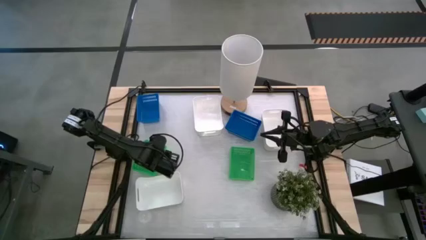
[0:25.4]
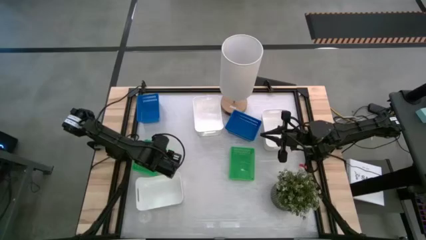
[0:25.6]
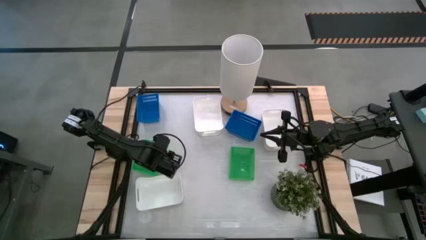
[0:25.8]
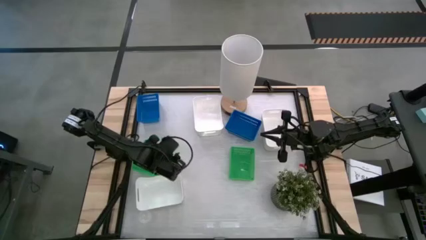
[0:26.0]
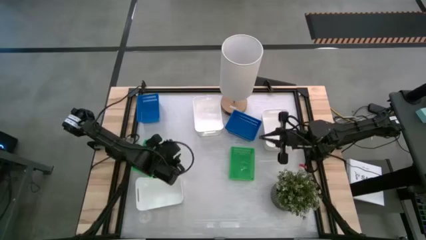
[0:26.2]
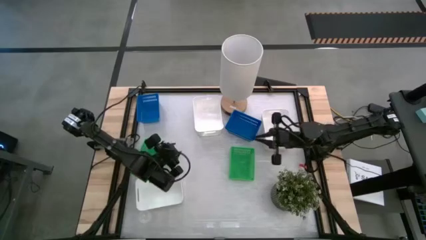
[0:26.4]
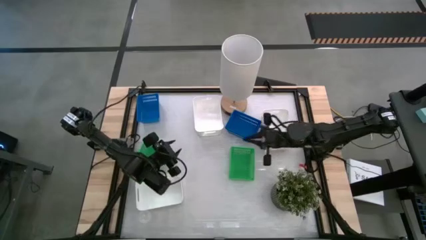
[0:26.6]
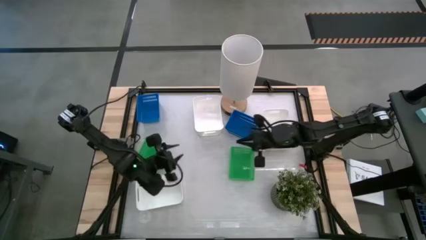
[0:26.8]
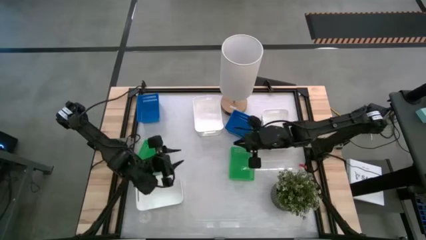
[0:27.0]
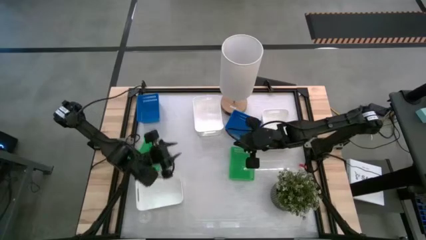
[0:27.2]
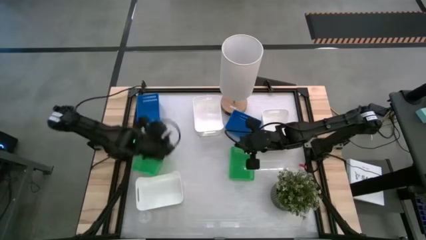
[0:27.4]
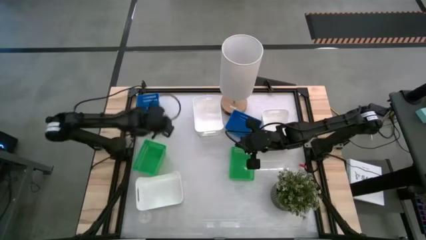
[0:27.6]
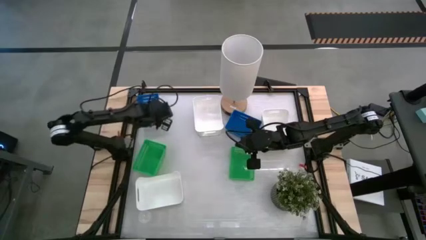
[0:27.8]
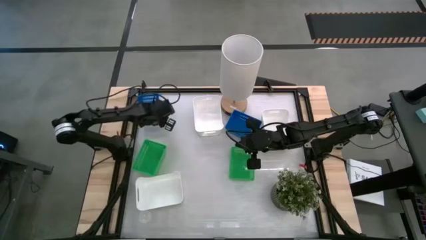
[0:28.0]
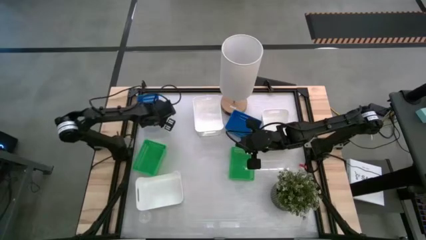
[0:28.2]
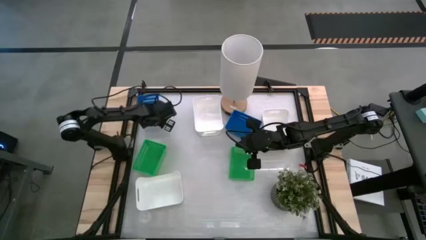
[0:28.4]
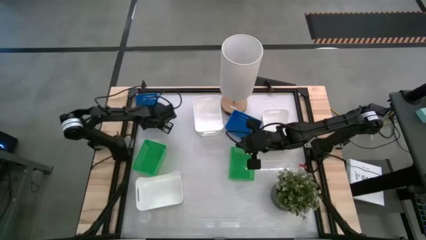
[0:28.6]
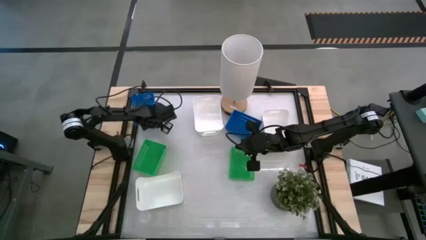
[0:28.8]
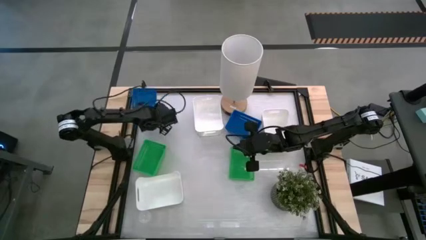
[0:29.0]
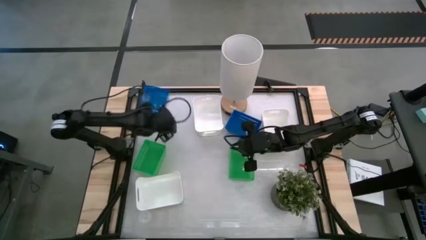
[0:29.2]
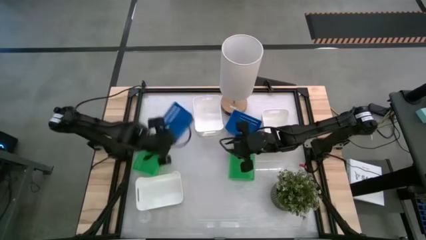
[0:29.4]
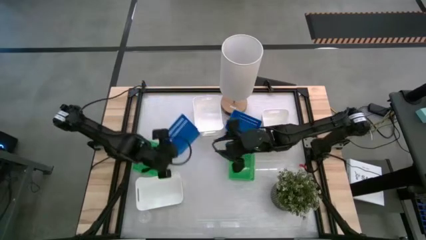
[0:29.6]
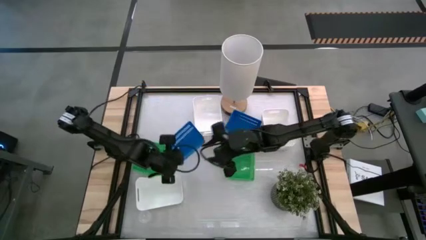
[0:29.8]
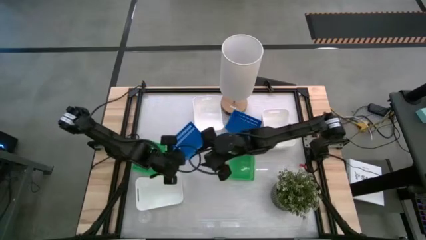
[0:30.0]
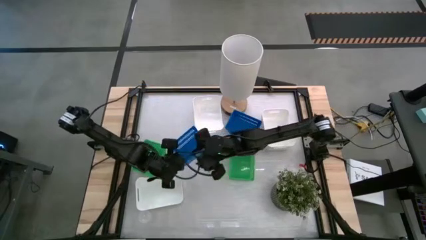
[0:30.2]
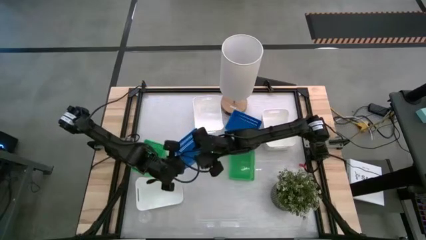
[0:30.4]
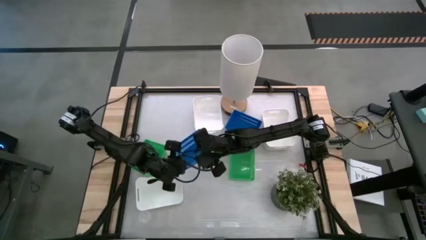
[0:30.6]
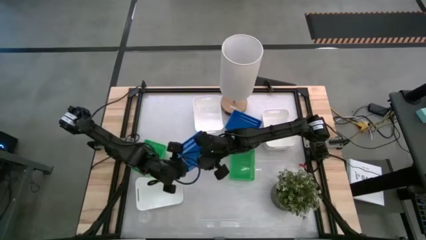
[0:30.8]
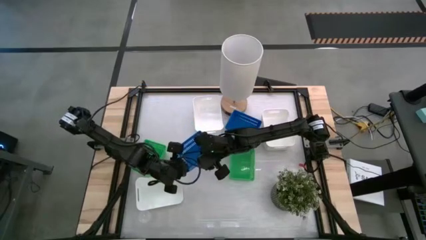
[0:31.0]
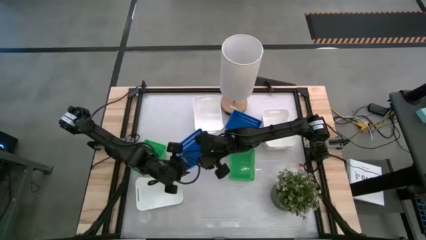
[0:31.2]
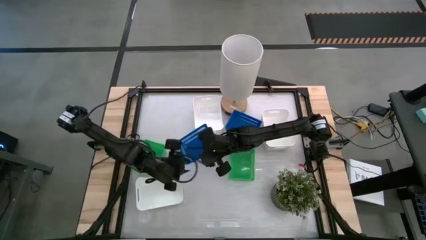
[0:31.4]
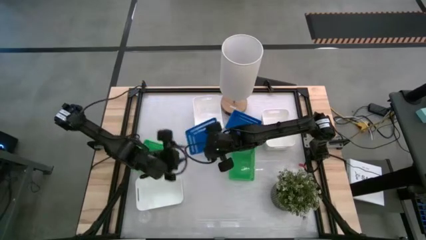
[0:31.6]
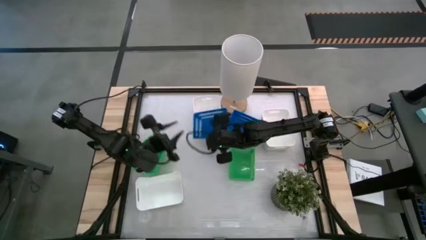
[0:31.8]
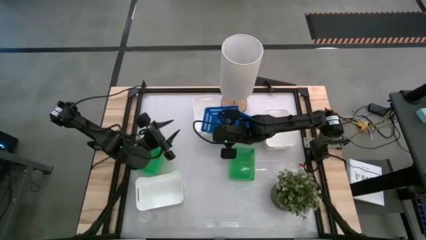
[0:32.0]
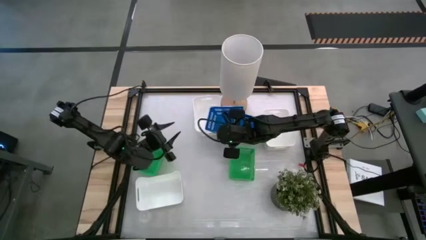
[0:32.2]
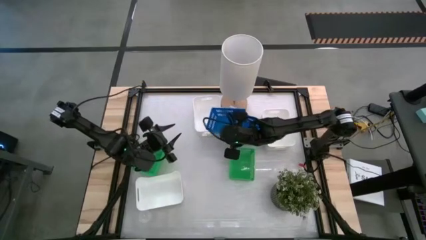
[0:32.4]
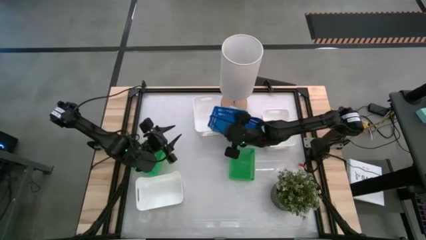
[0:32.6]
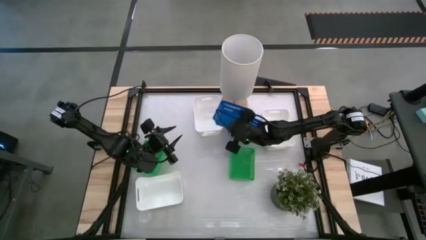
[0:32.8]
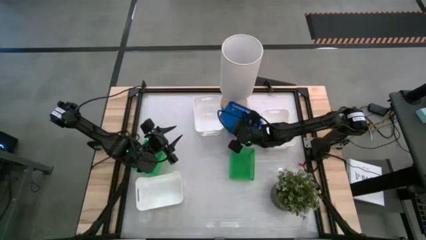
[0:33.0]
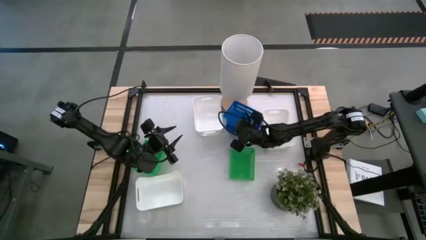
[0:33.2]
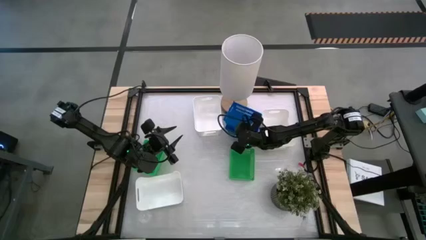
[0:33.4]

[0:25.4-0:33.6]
Stack the left blue bin on top of the right blue bin on the table
